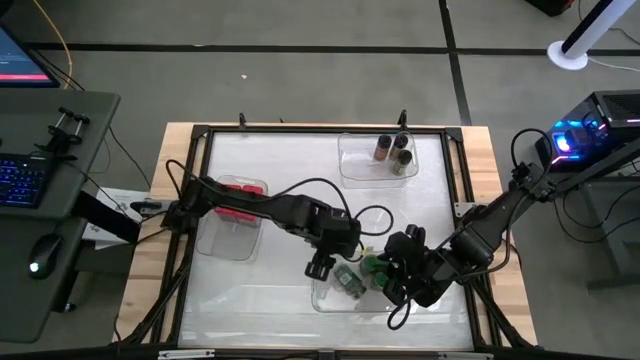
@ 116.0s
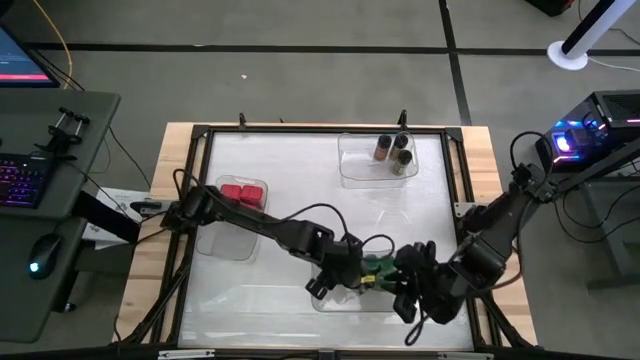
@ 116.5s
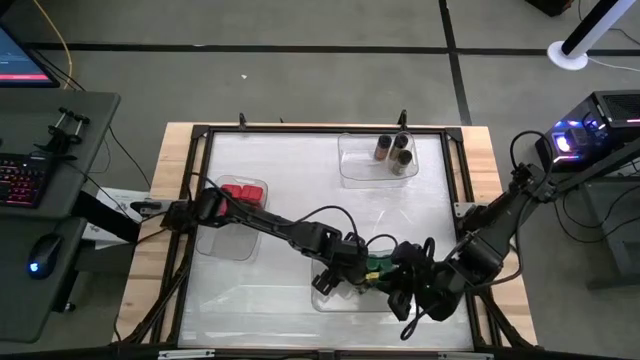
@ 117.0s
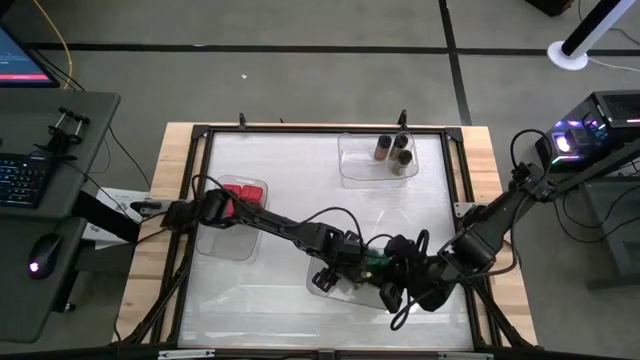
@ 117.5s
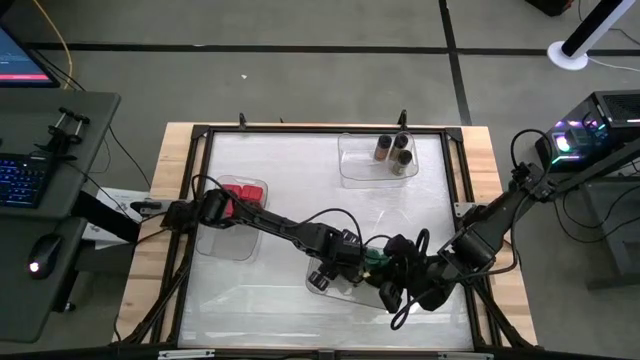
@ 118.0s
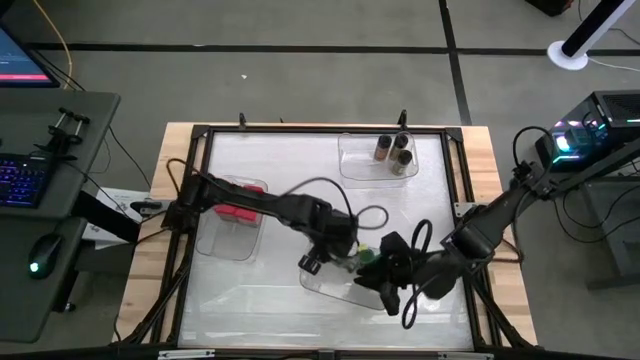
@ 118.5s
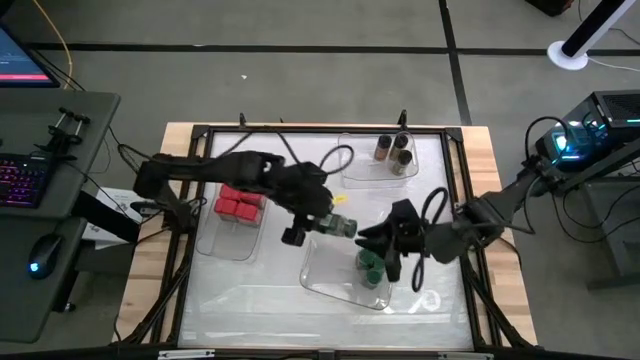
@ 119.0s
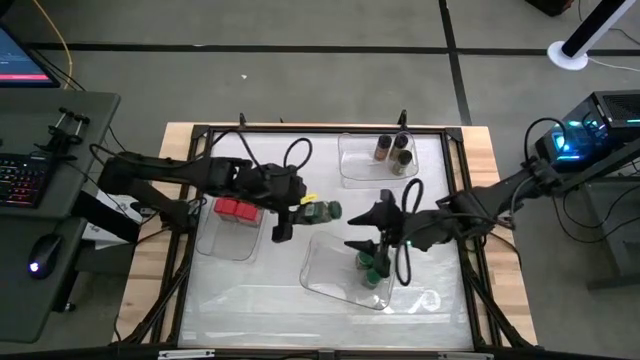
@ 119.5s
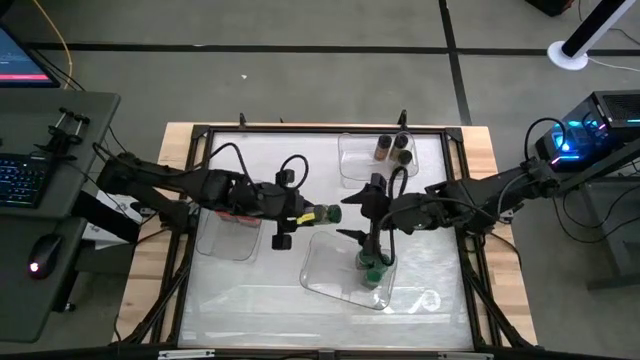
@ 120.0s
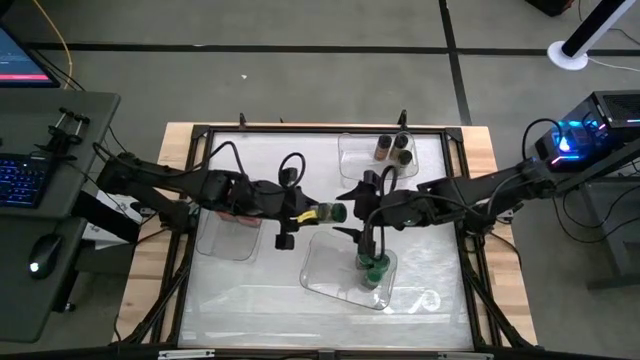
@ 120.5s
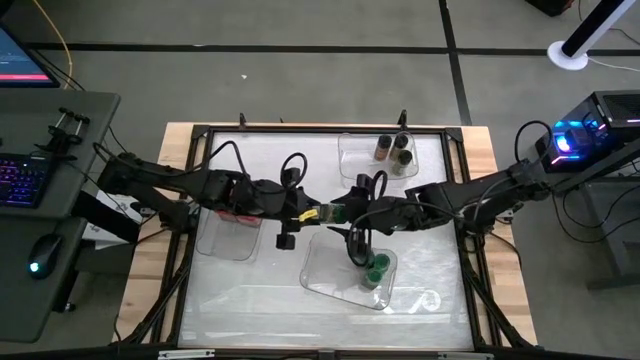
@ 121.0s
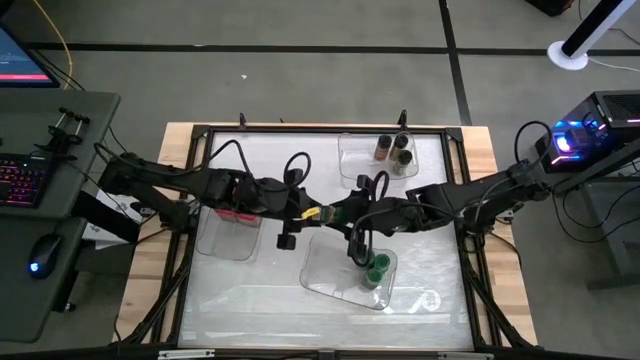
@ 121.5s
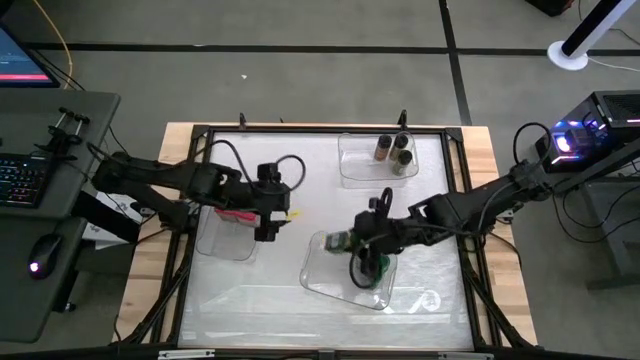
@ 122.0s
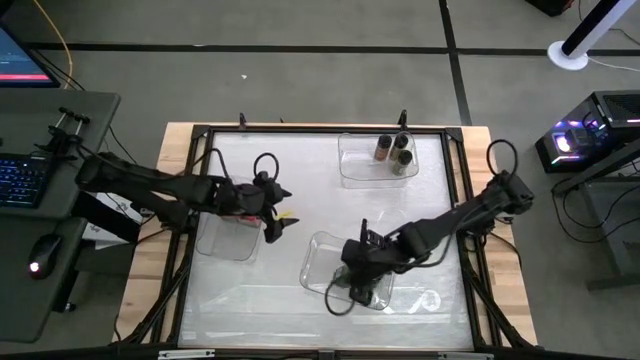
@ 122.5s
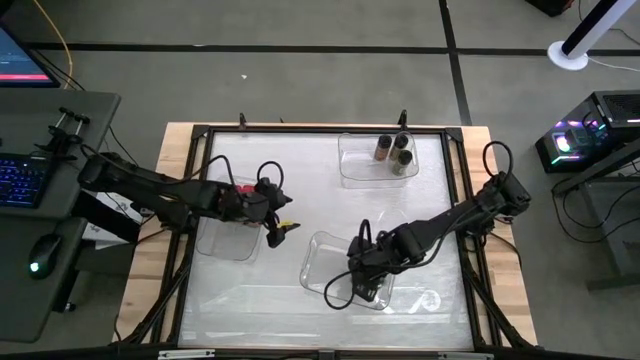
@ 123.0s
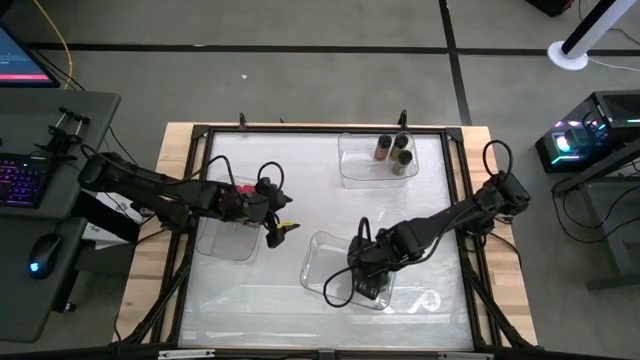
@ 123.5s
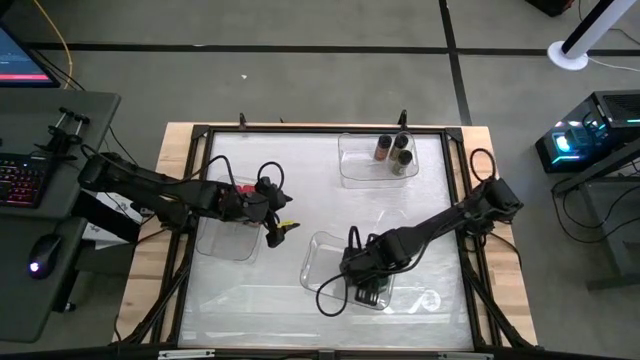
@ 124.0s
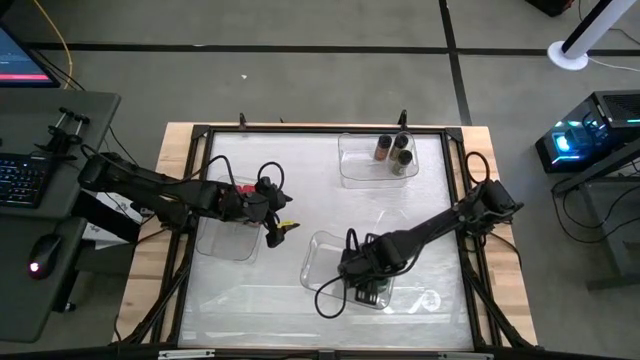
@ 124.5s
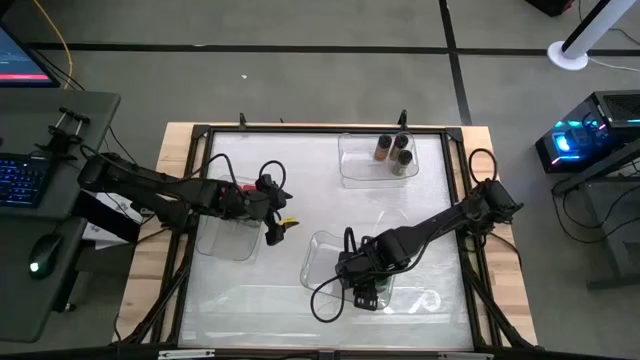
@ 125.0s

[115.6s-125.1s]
Task: Sort spices by type
Put the green seasoning bottle into the bottom right transparent bin

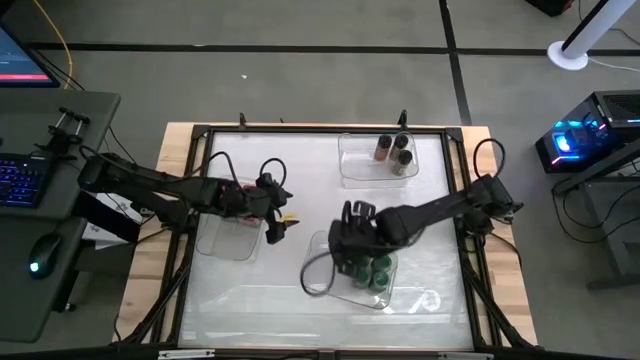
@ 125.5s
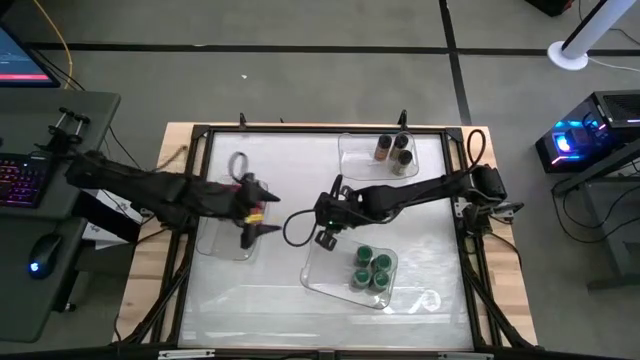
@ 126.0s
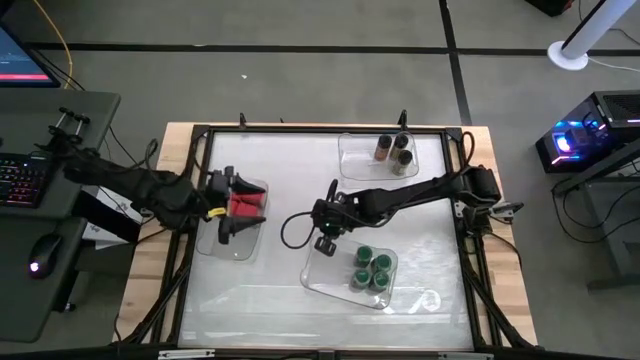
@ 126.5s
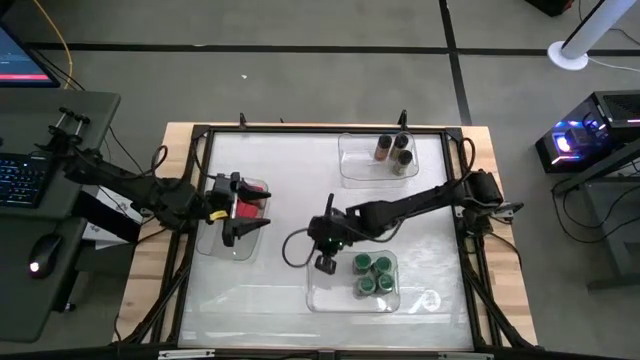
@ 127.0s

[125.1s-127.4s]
Adjust the bottom right transparent bin

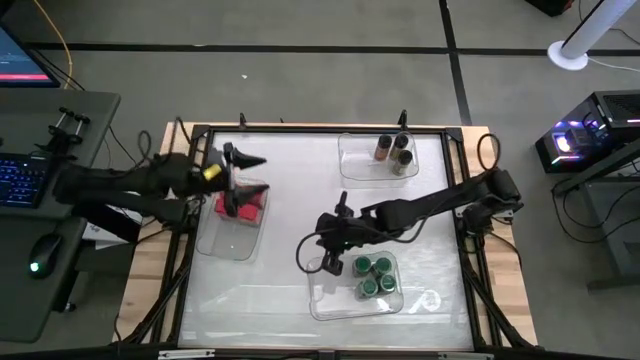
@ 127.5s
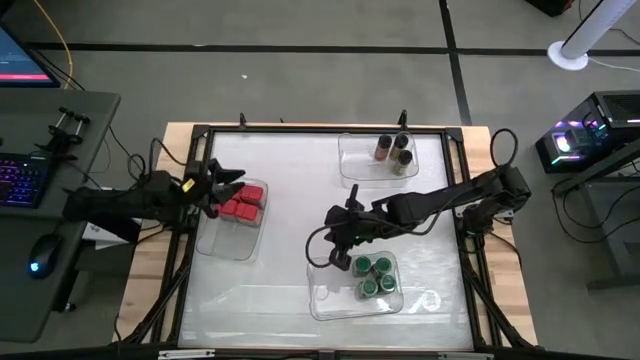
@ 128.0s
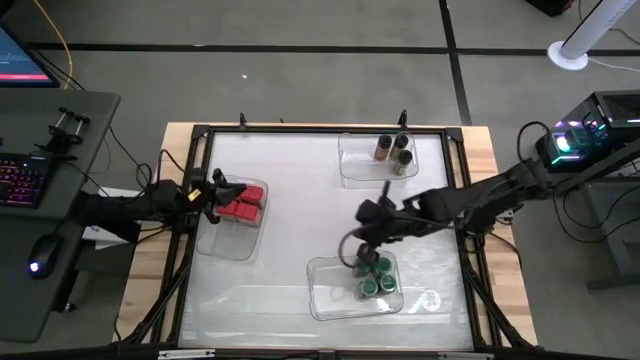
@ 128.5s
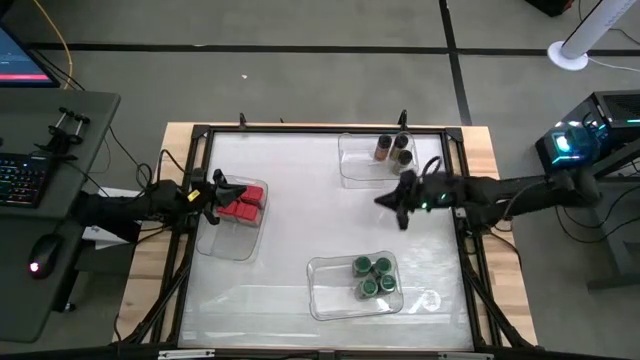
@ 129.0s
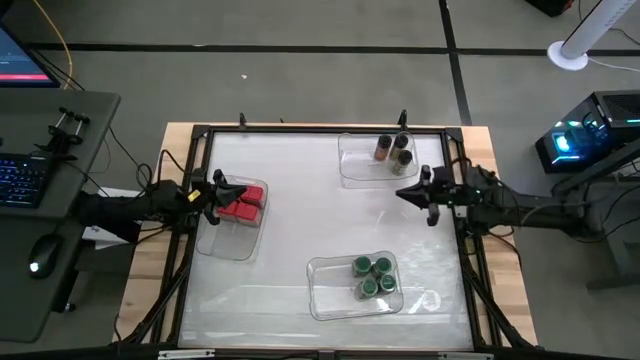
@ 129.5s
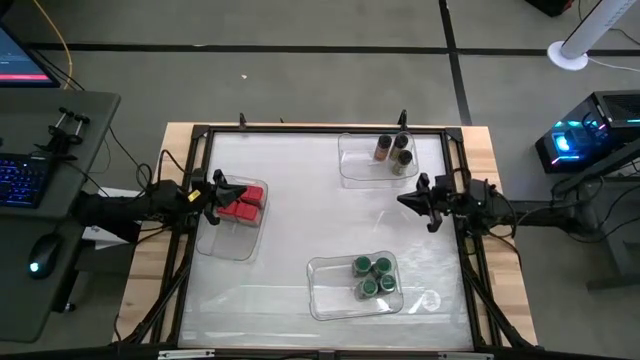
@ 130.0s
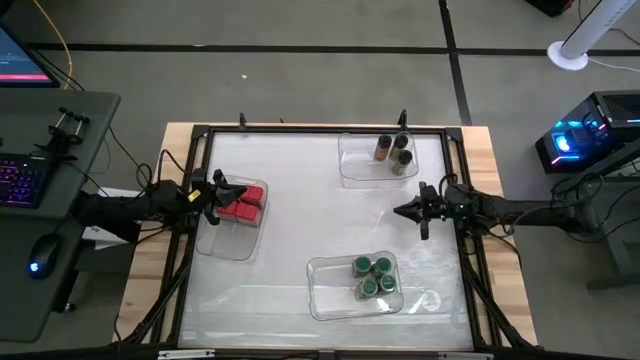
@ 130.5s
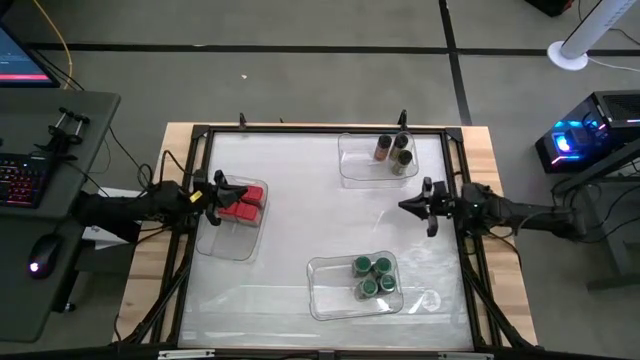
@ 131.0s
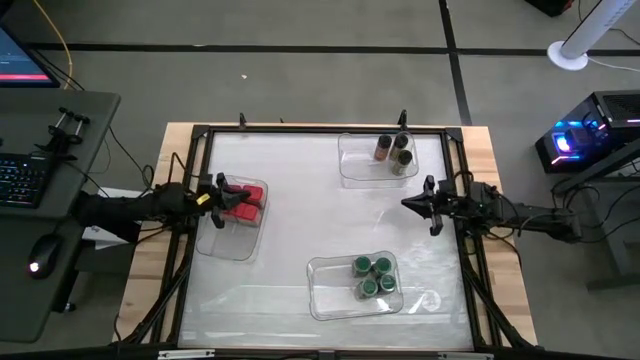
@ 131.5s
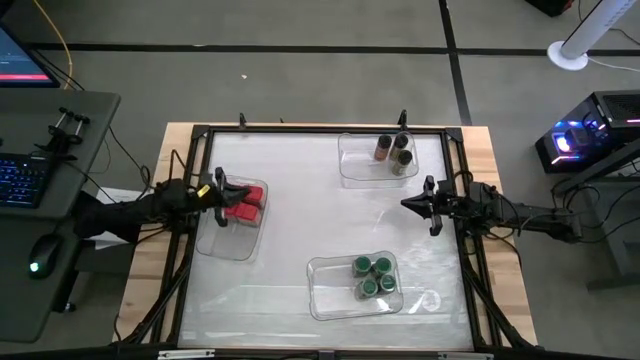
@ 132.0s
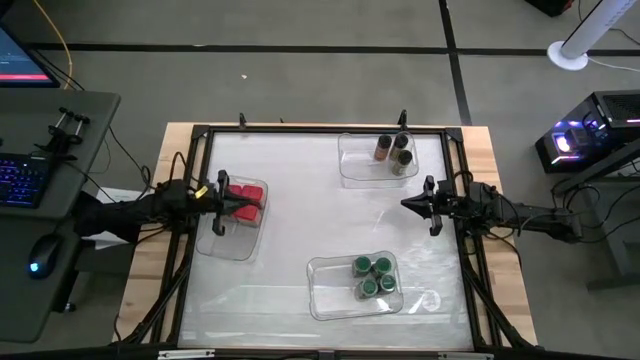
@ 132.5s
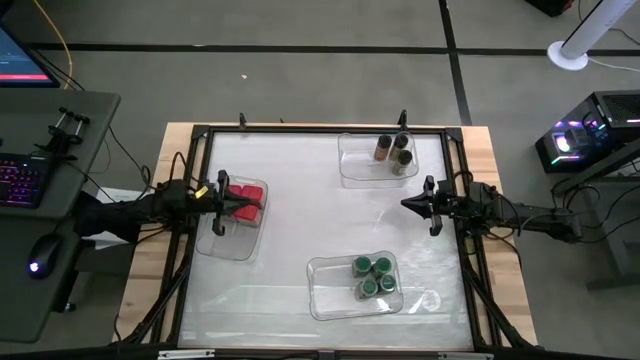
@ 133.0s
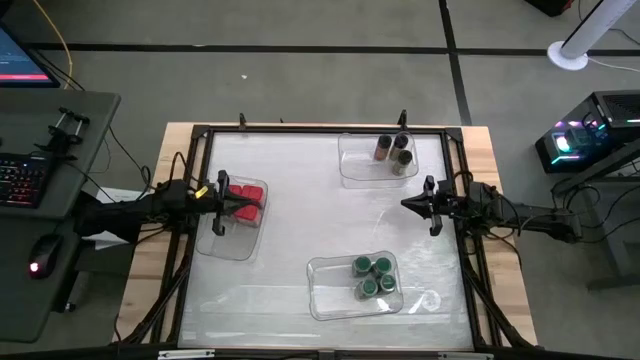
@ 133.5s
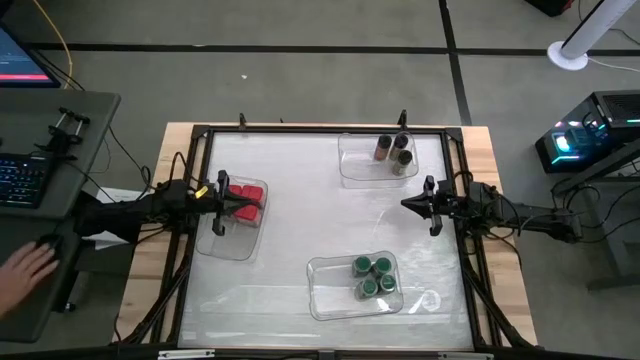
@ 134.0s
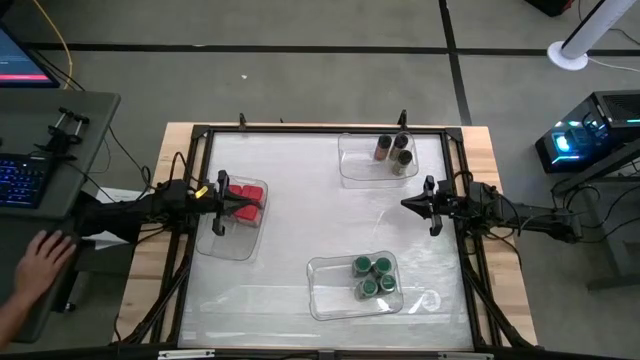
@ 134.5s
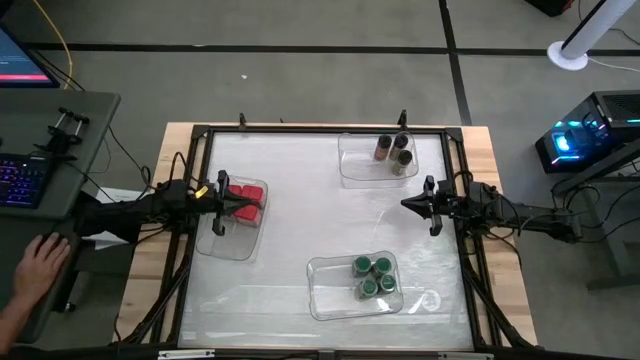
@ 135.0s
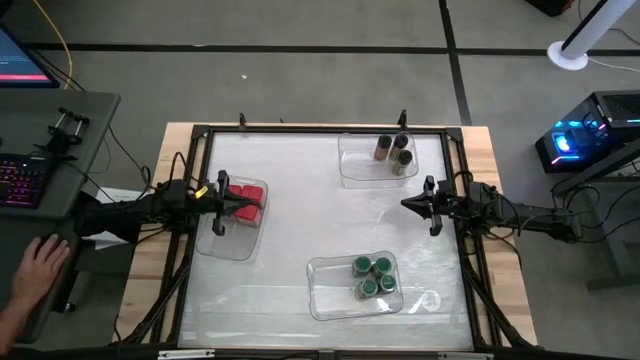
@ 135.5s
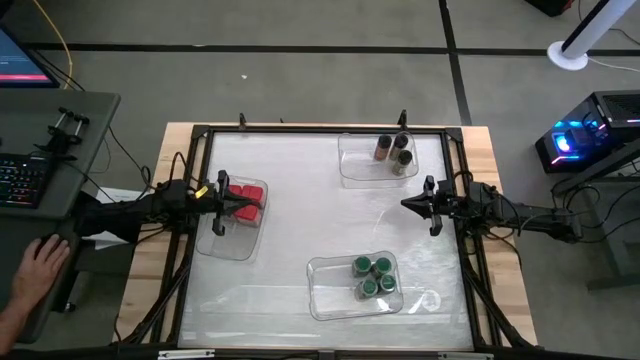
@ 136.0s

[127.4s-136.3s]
Return to Home Position
